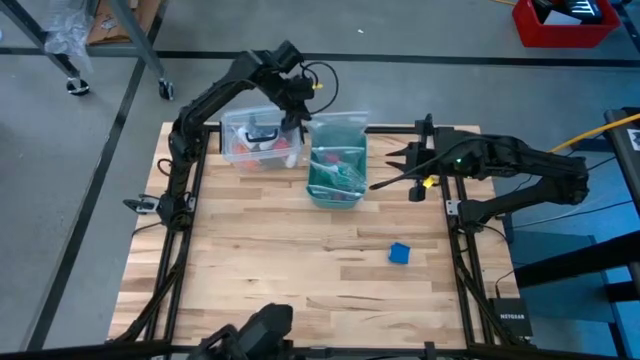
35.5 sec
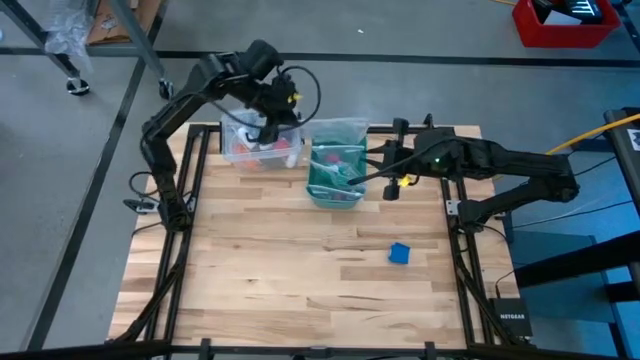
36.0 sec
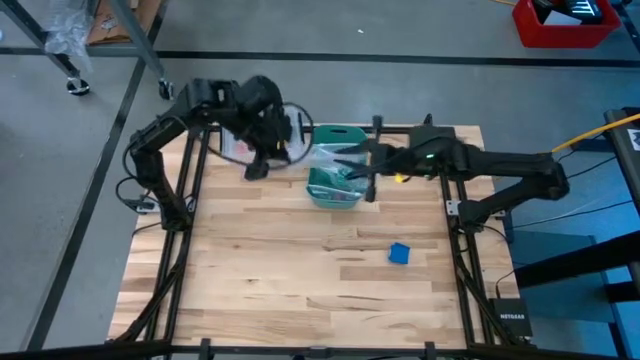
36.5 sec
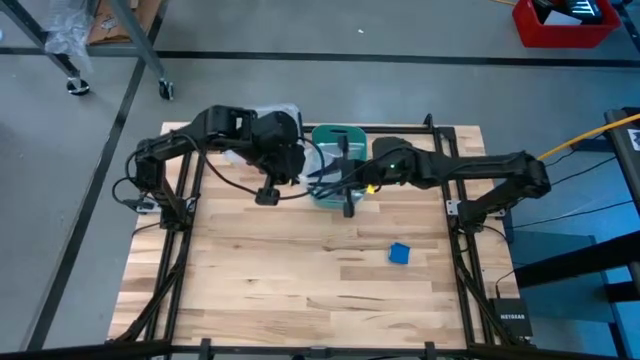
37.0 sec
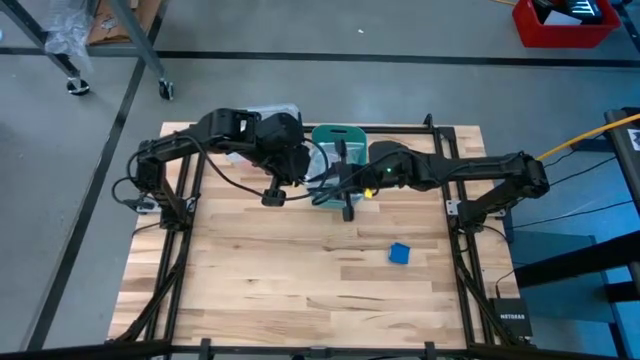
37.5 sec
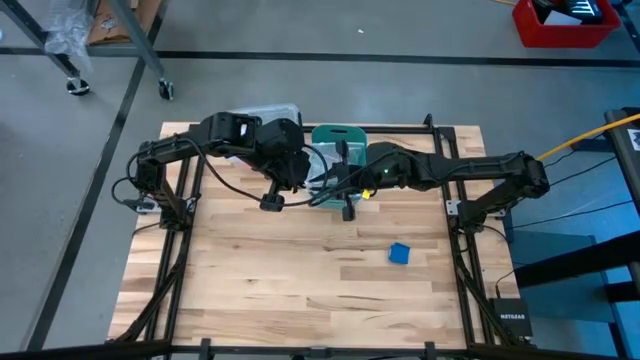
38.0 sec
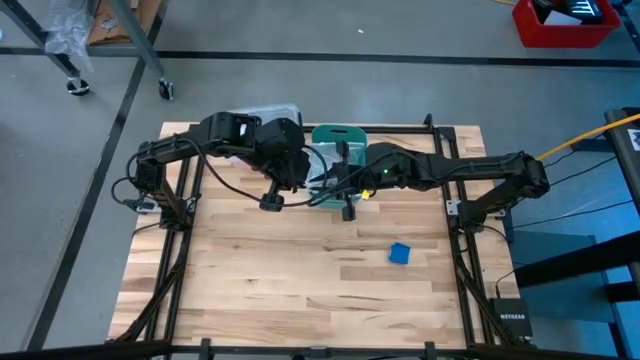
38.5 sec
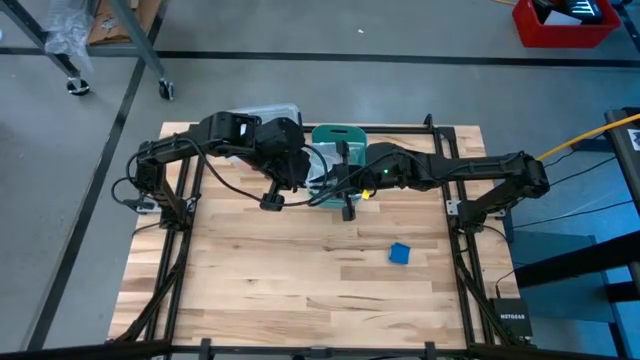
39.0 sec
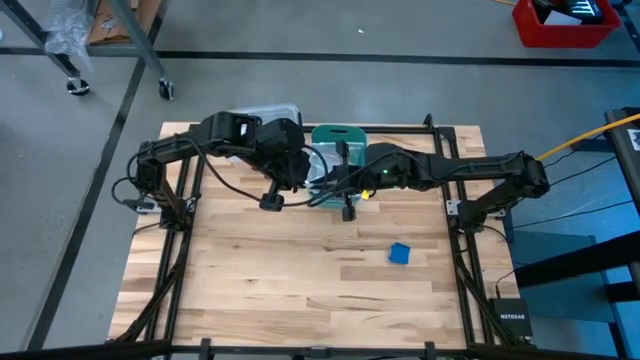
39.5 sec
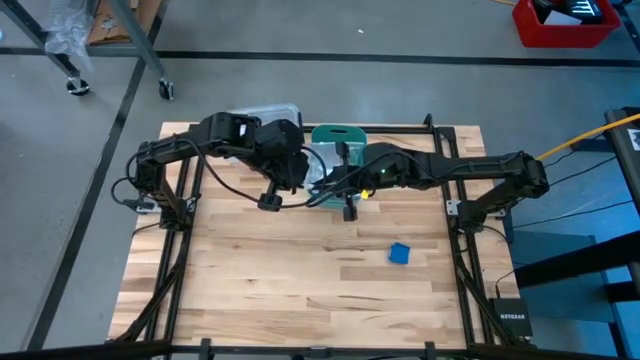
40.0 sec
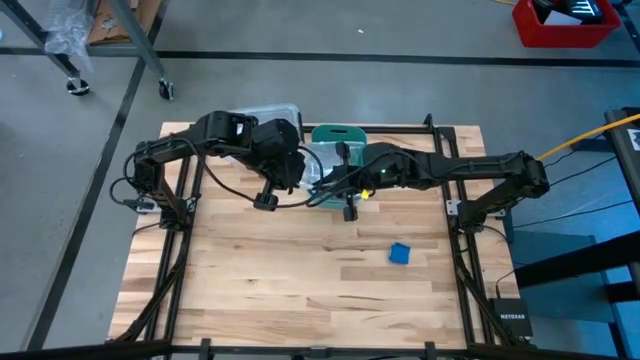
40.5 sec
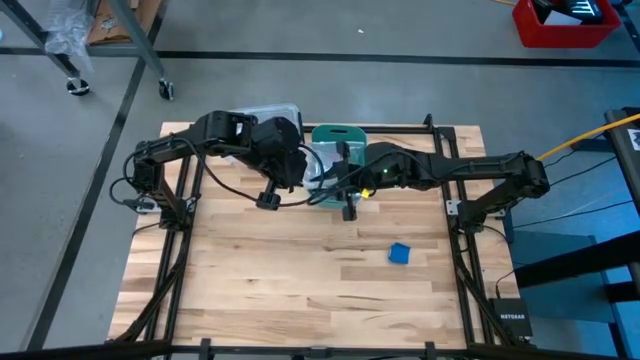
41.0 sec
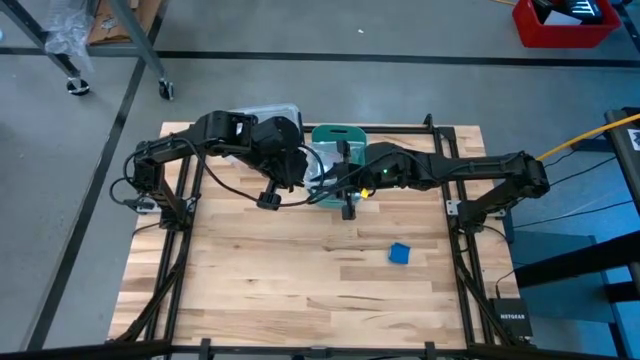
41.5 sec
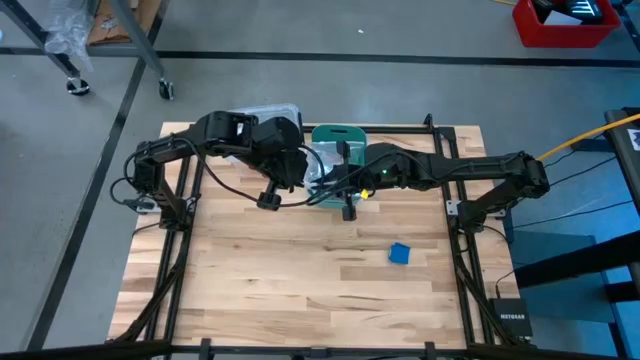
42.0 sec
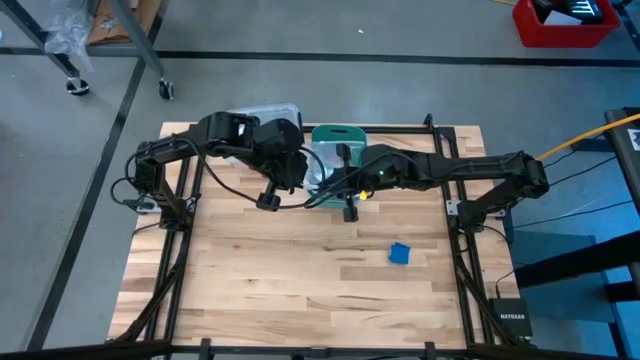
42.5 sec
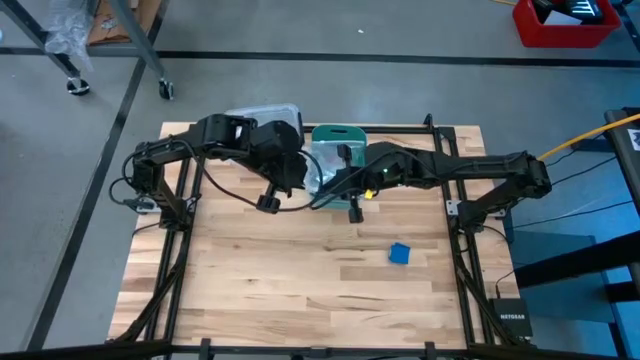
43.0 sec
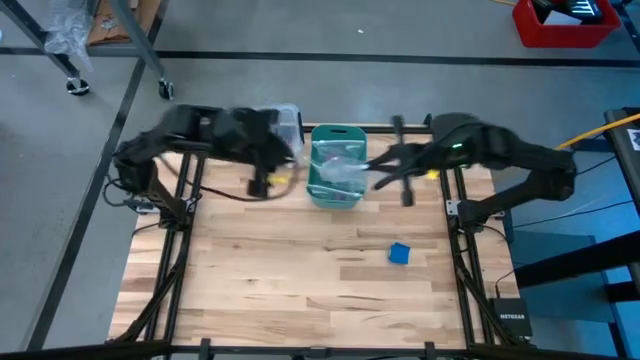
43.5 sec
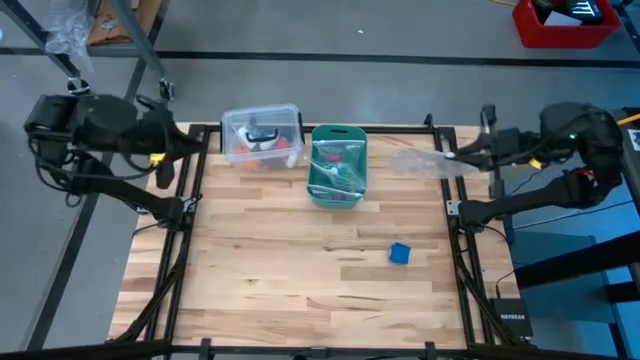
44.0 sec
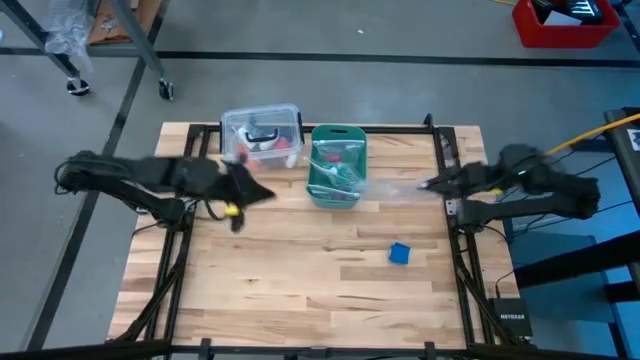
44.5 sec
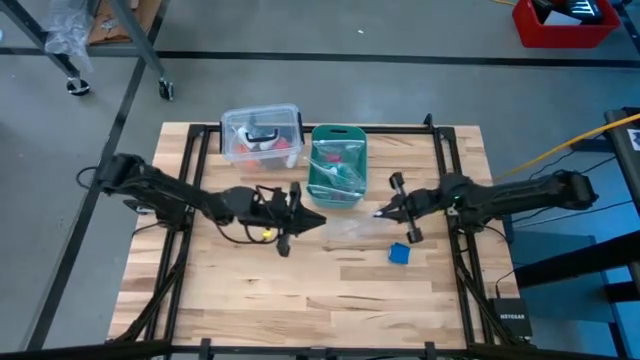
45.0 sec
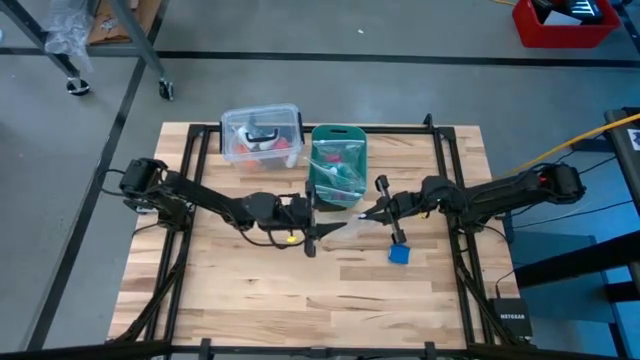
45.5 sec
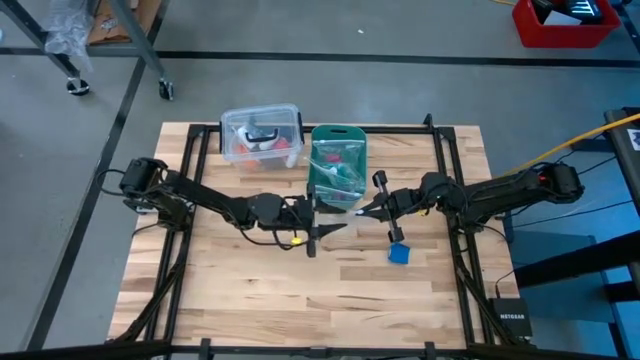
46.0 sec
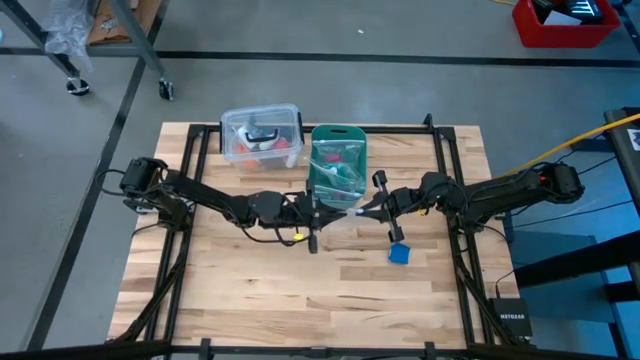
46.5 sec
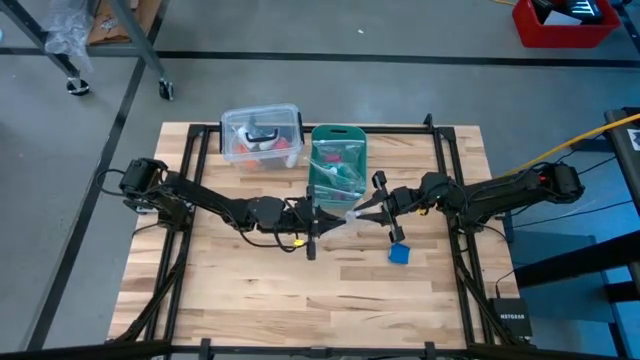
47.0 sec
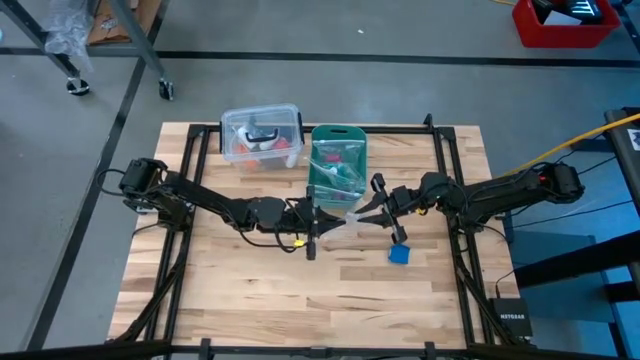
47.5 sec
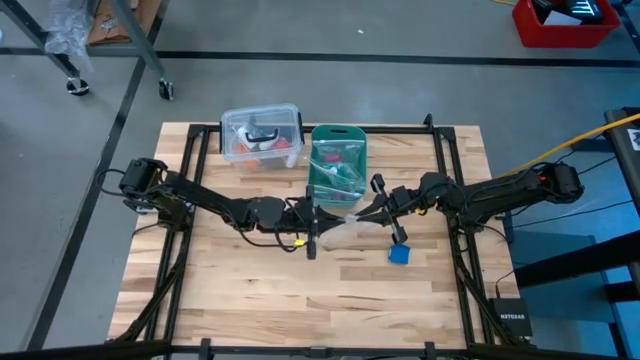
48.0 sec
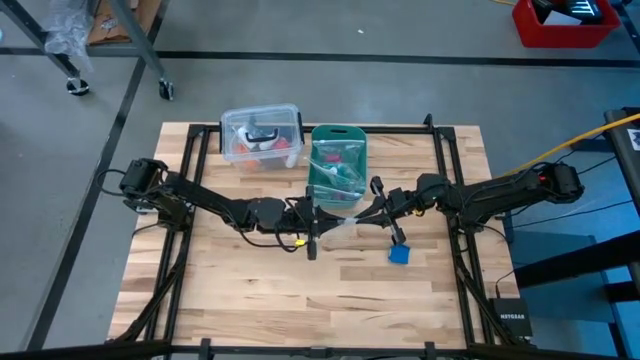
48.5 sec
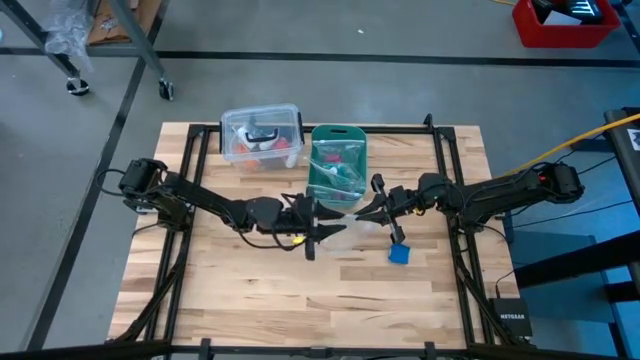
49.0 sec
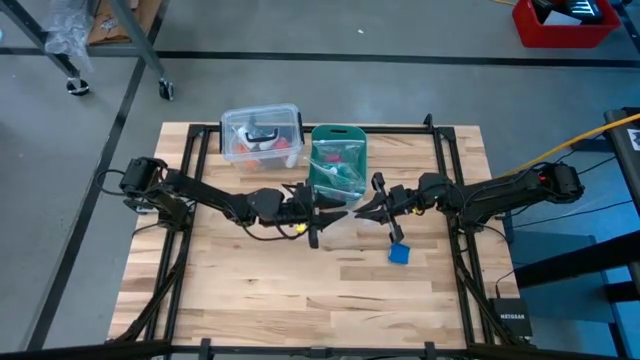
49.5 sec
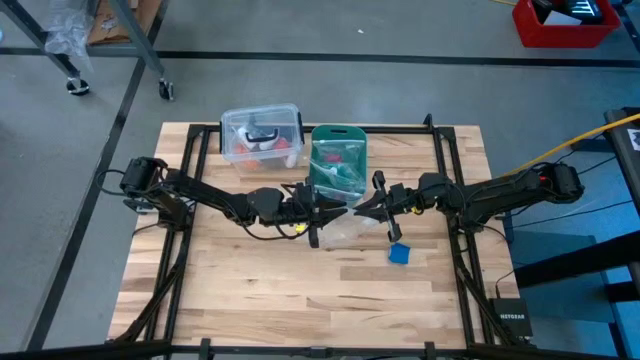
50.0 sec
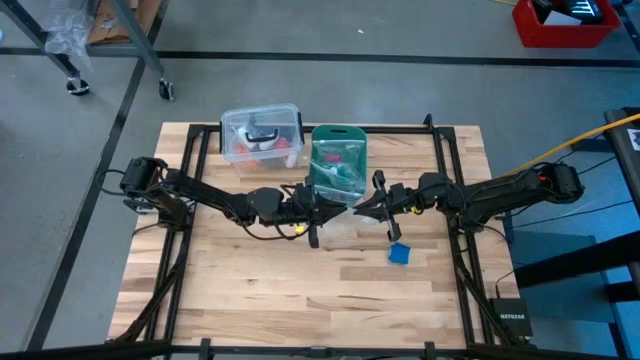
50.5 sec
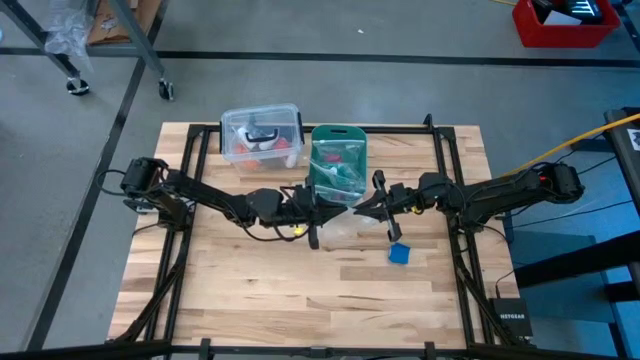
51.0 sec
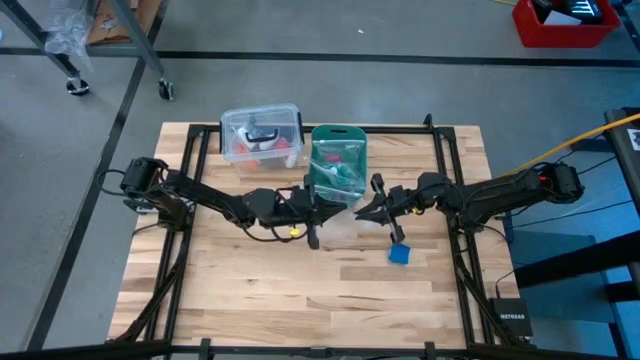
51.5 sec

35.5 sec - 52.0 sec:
Task: Roll bandage
Open the transparent zip bag

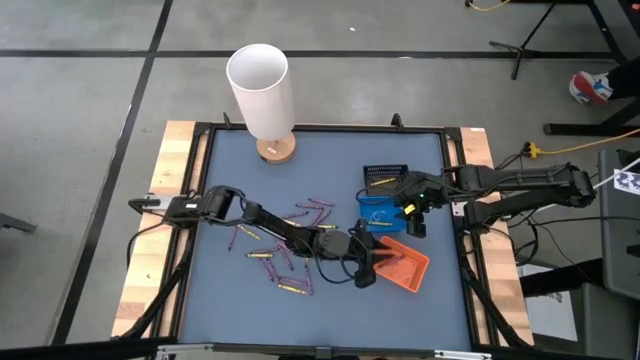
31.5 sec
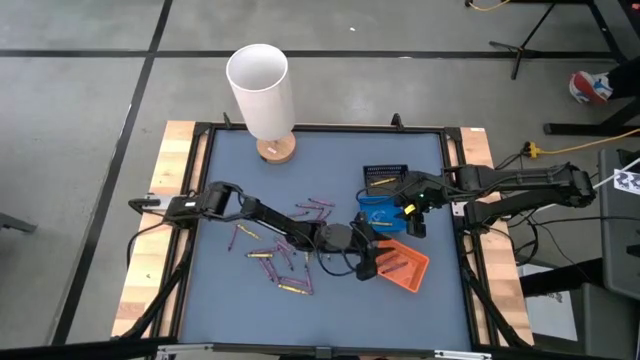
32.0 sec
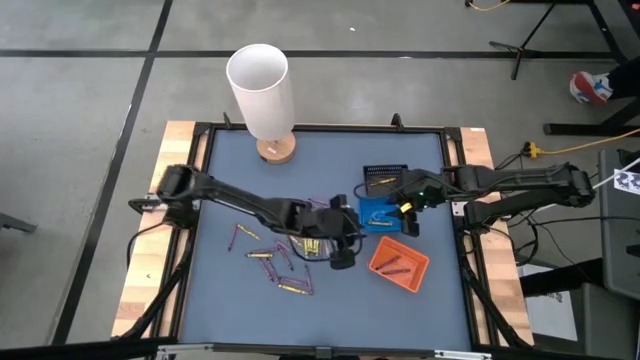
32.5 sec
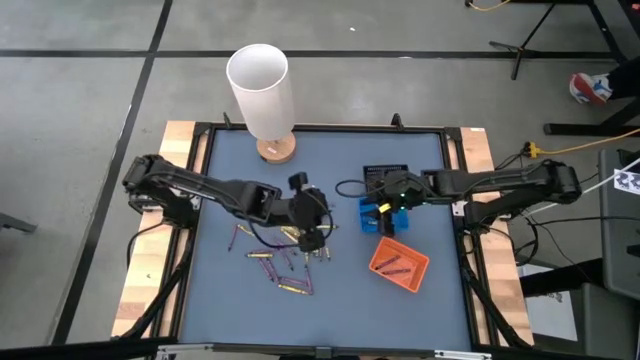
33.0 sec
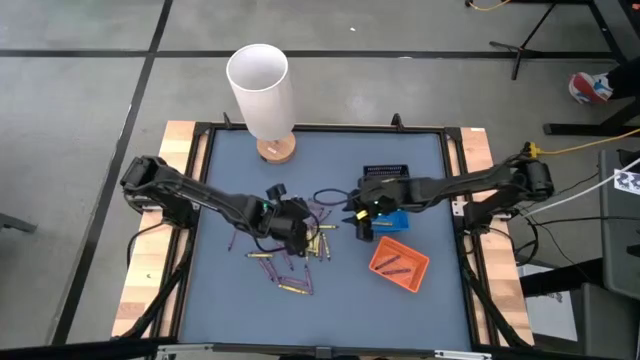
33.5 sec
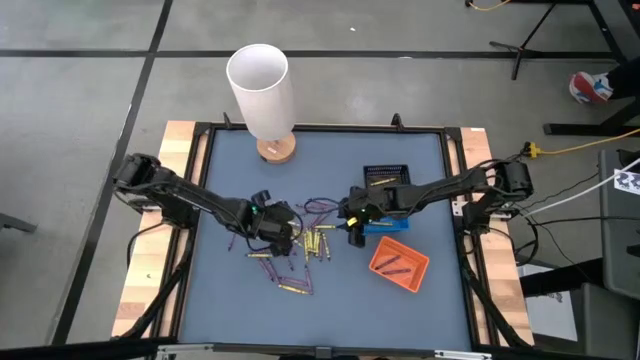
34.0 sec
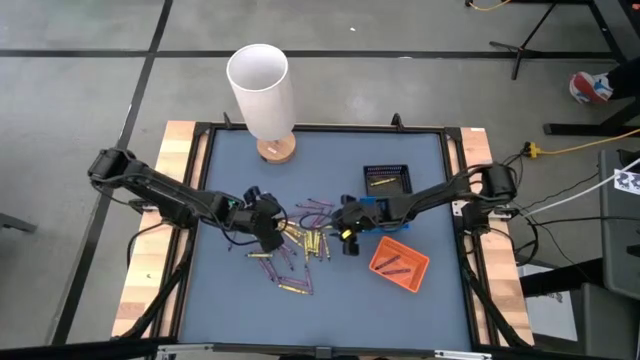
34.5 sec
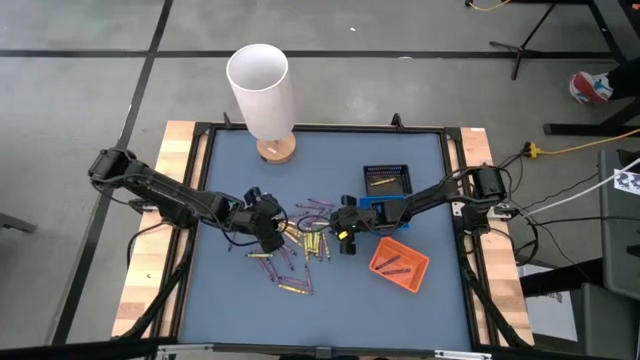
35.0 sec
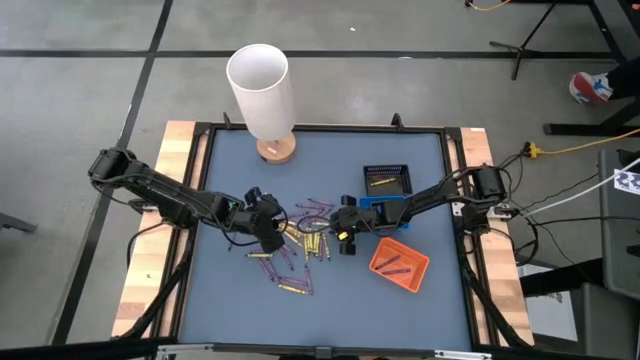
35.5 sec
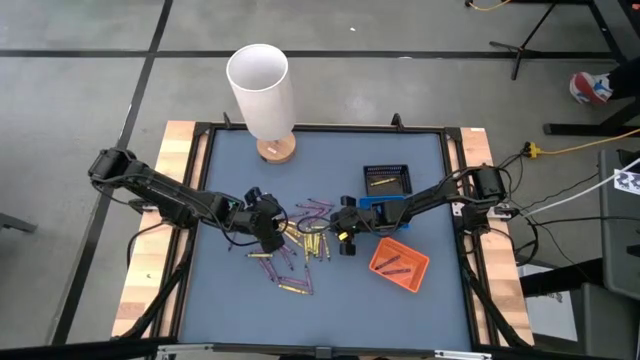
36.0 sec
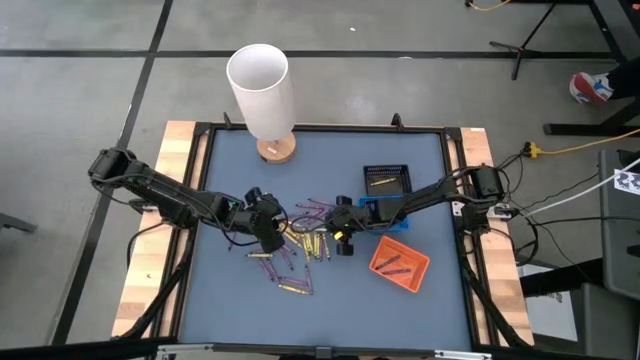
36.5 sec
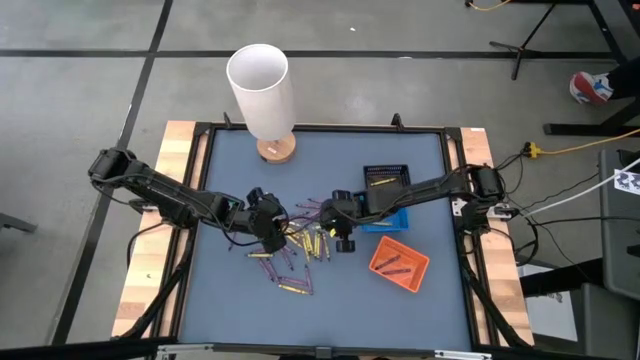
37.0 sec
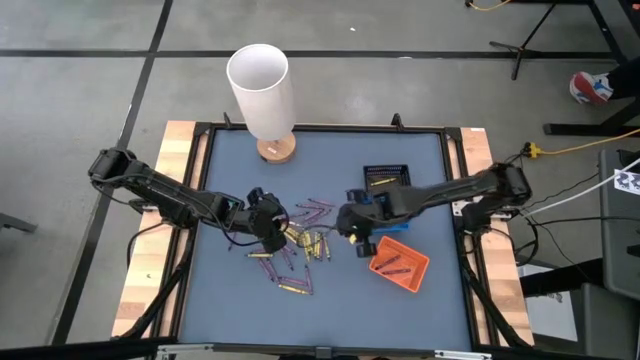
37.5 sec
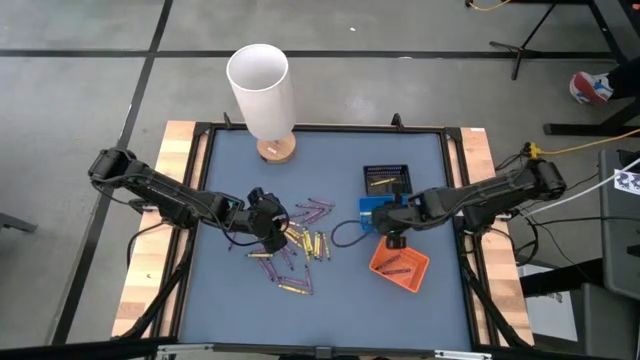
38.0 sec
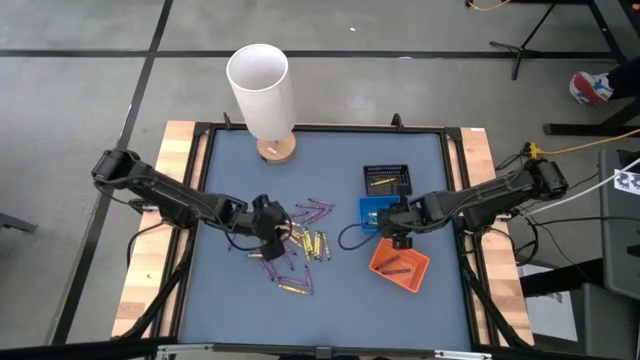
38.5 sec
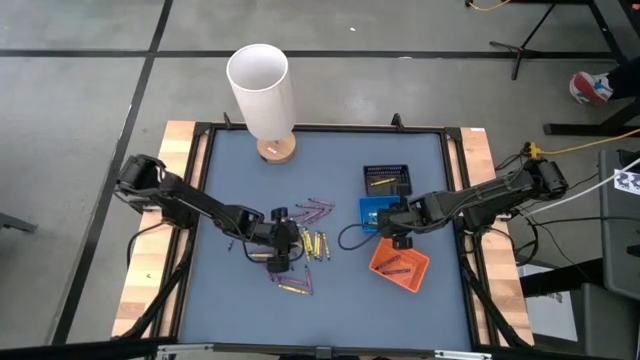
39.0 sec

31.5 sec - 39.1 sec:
Task: Sort crayons
Put the green crayon into the blue bin
